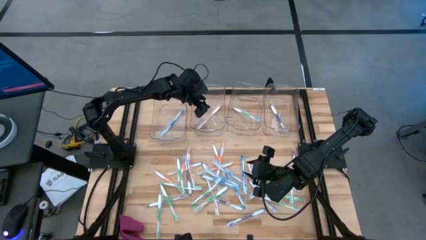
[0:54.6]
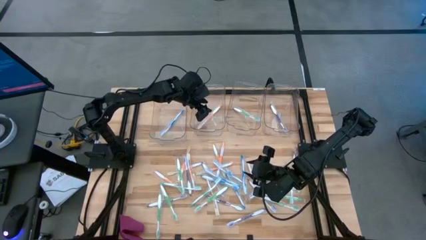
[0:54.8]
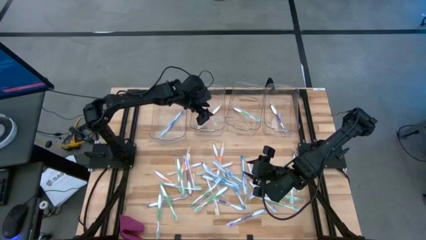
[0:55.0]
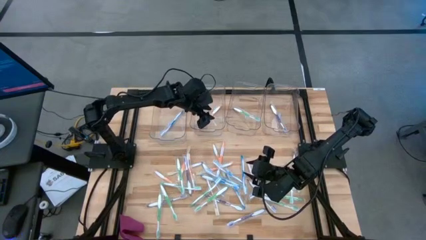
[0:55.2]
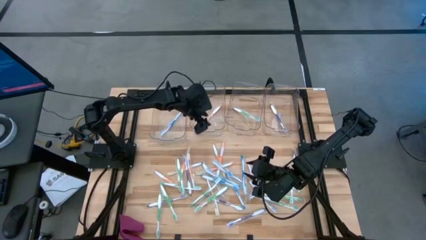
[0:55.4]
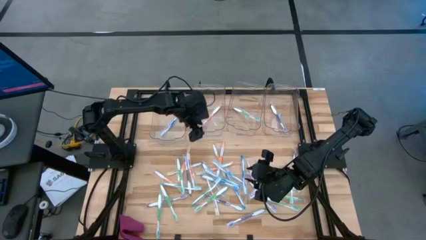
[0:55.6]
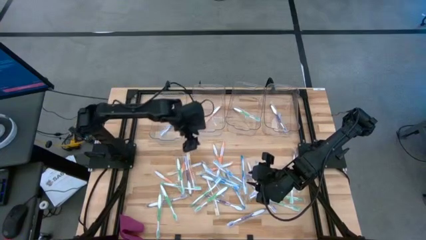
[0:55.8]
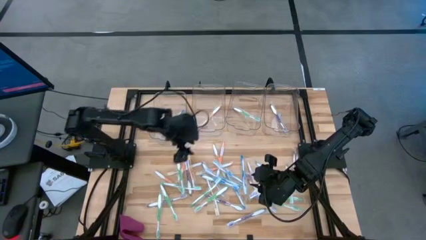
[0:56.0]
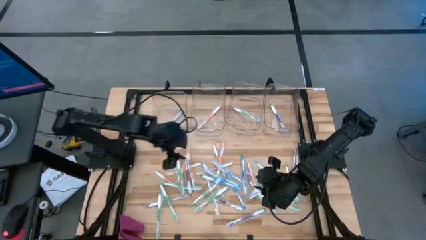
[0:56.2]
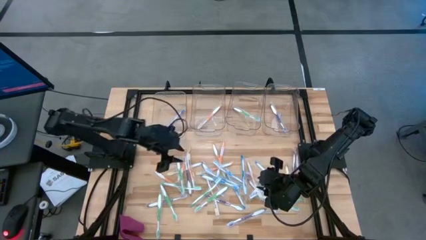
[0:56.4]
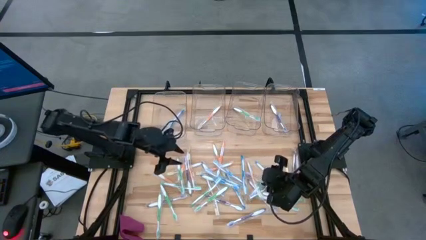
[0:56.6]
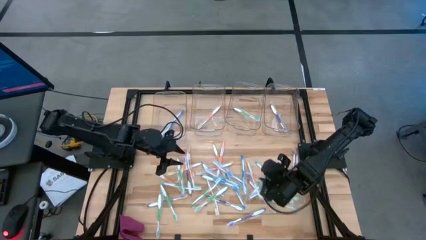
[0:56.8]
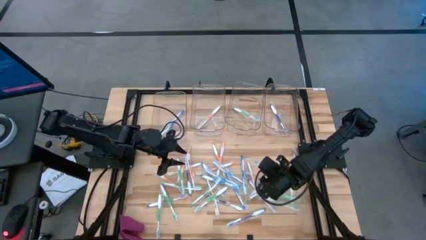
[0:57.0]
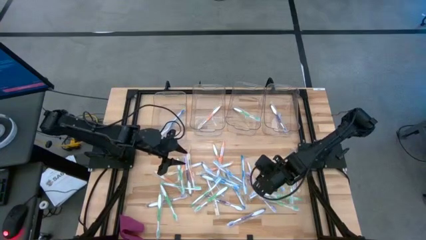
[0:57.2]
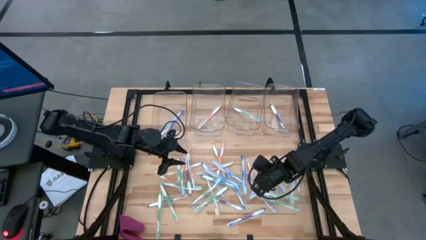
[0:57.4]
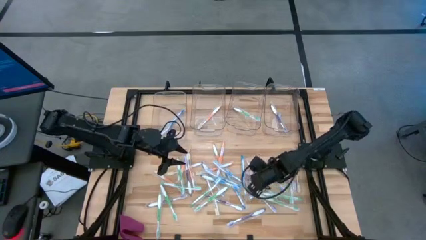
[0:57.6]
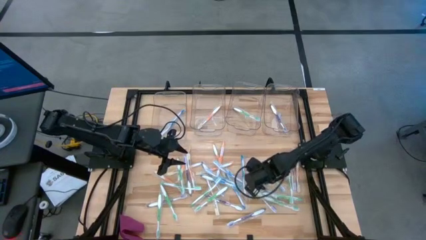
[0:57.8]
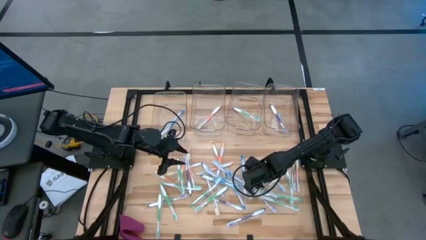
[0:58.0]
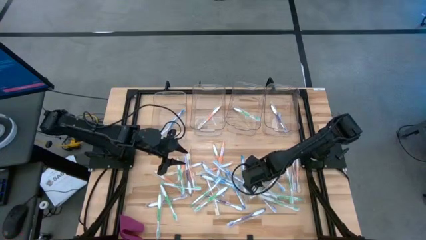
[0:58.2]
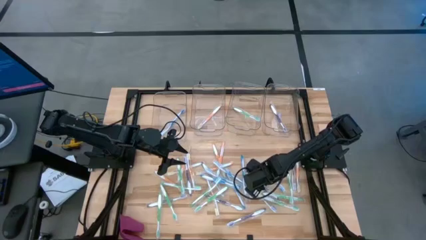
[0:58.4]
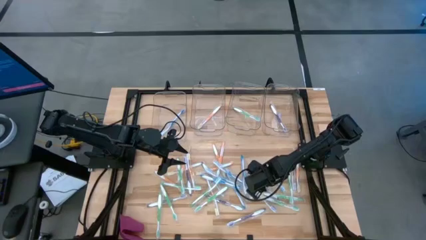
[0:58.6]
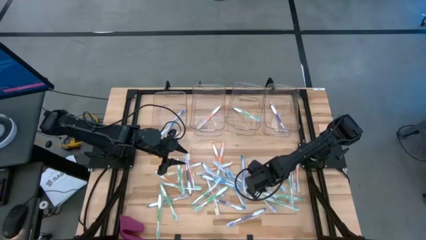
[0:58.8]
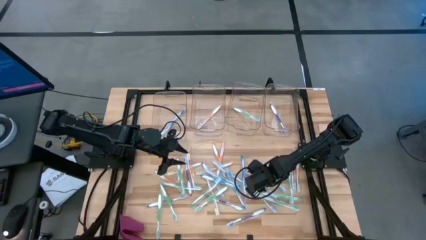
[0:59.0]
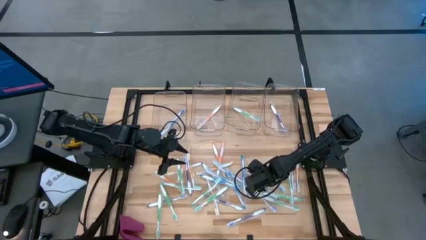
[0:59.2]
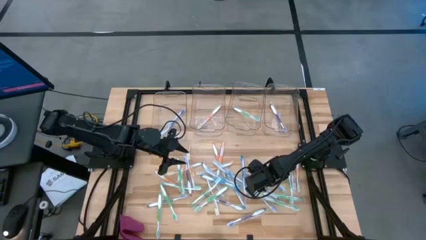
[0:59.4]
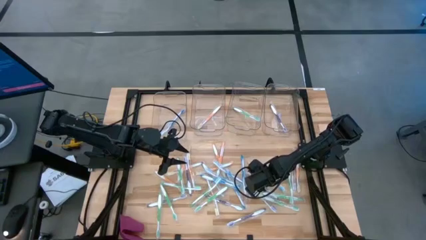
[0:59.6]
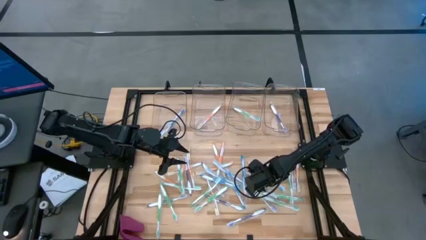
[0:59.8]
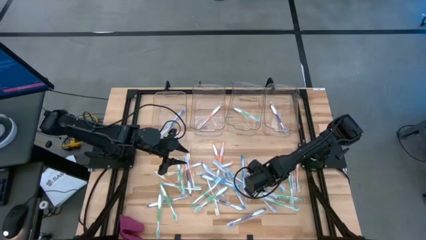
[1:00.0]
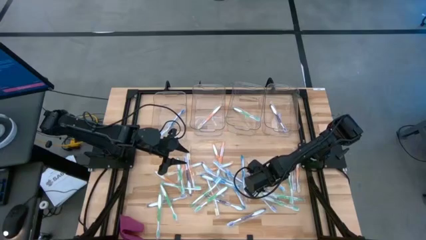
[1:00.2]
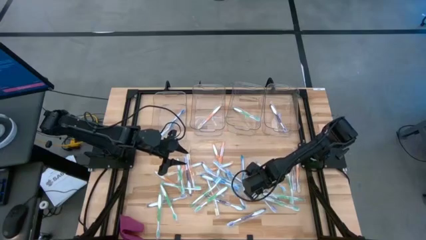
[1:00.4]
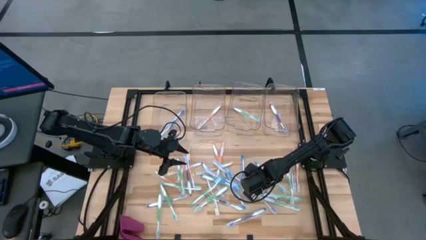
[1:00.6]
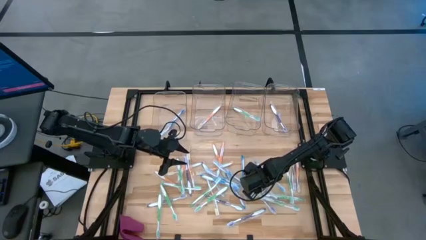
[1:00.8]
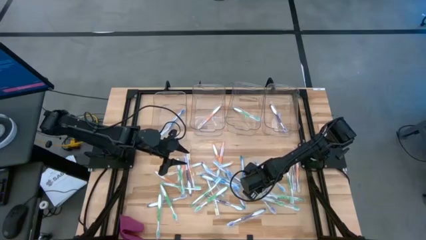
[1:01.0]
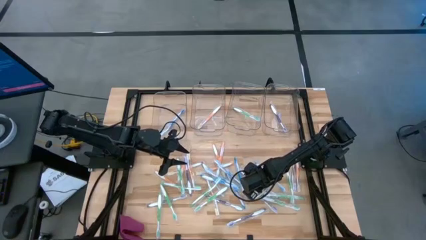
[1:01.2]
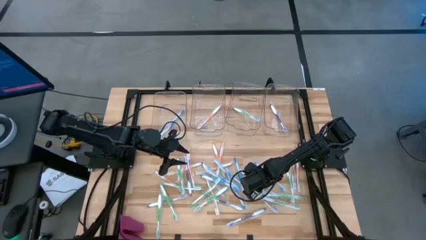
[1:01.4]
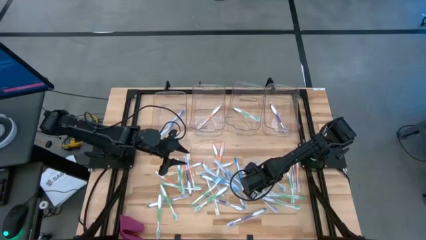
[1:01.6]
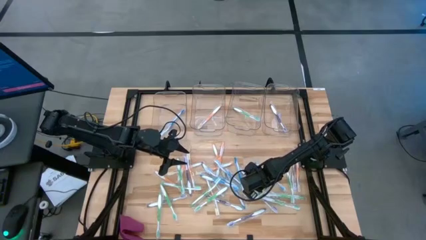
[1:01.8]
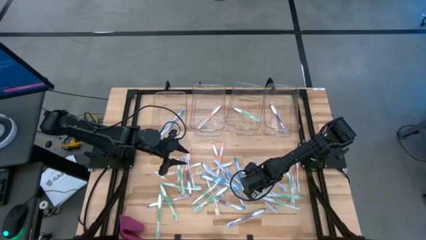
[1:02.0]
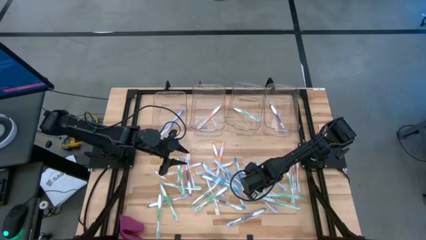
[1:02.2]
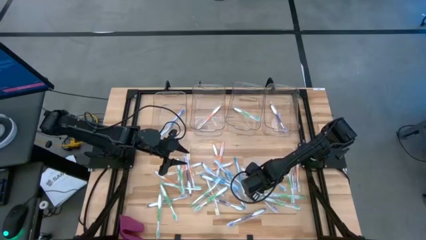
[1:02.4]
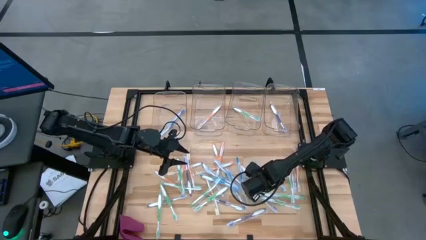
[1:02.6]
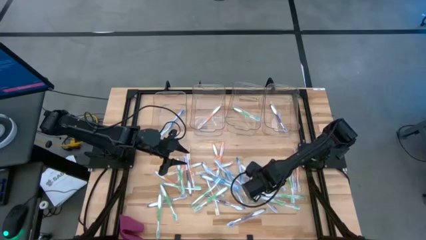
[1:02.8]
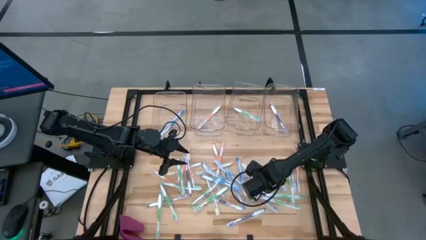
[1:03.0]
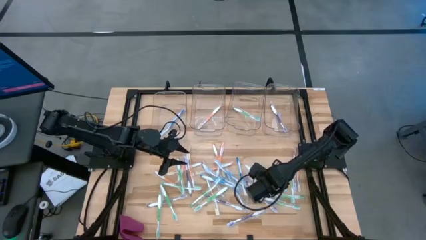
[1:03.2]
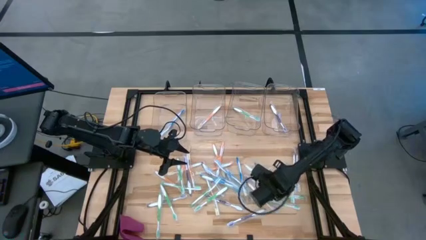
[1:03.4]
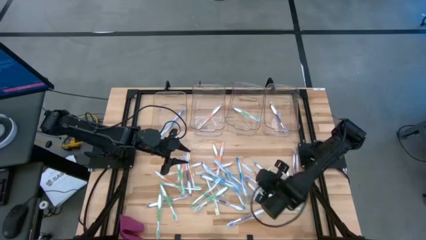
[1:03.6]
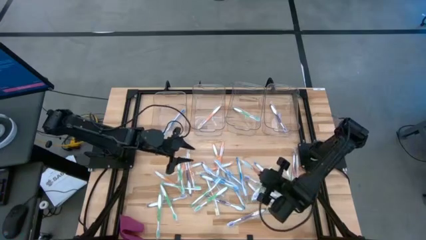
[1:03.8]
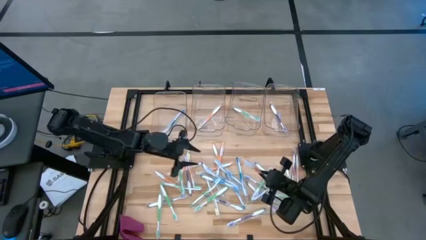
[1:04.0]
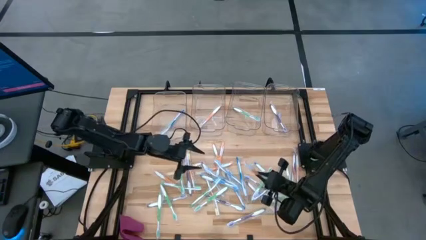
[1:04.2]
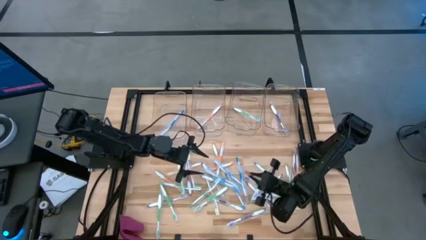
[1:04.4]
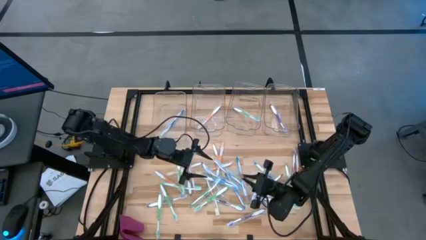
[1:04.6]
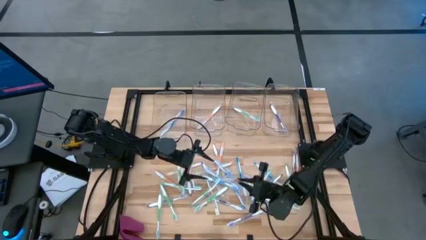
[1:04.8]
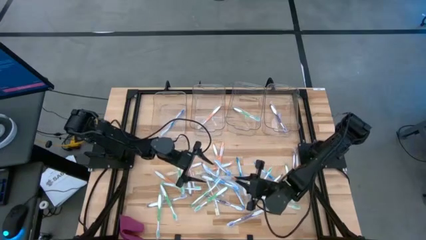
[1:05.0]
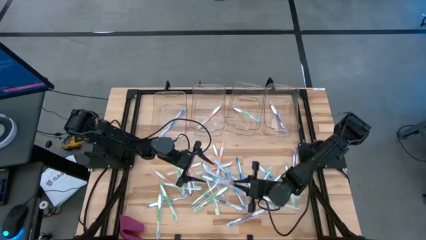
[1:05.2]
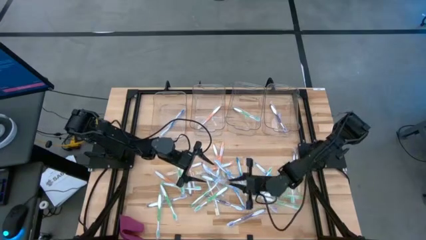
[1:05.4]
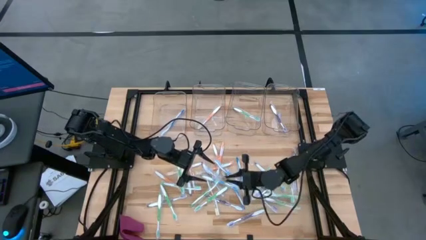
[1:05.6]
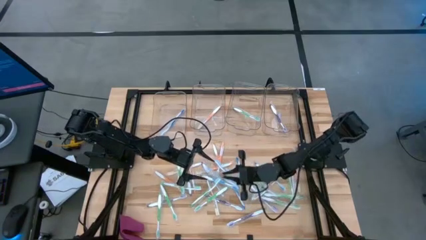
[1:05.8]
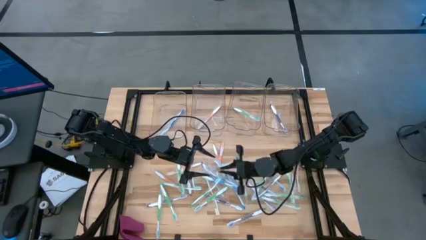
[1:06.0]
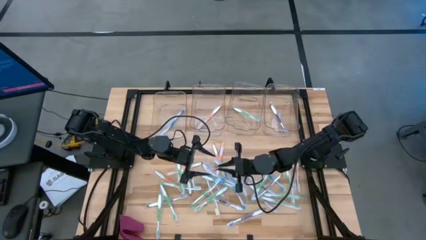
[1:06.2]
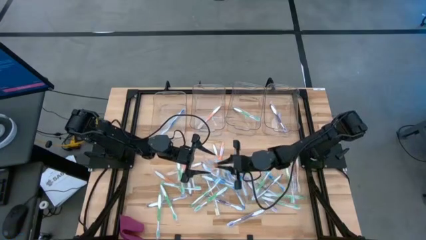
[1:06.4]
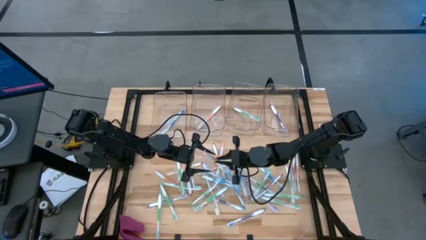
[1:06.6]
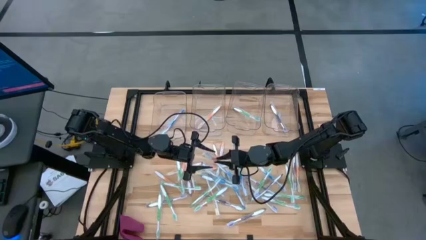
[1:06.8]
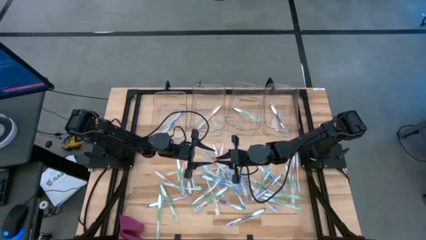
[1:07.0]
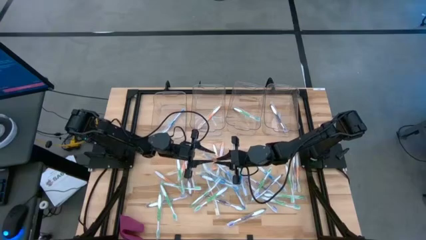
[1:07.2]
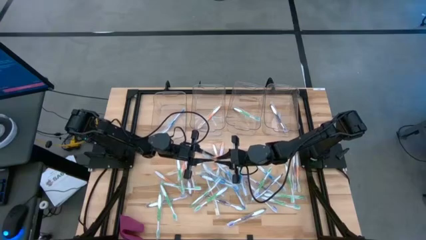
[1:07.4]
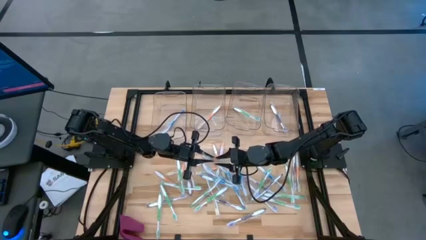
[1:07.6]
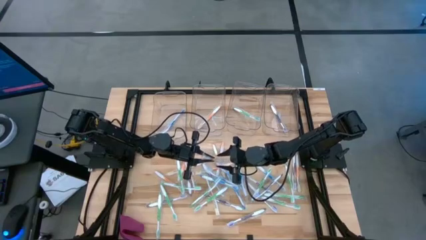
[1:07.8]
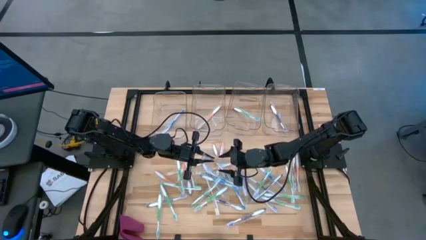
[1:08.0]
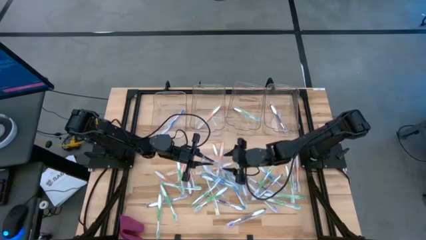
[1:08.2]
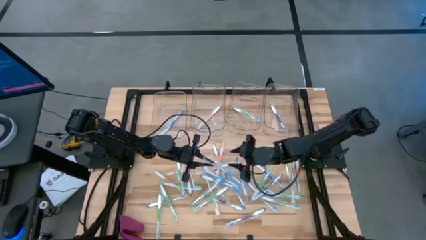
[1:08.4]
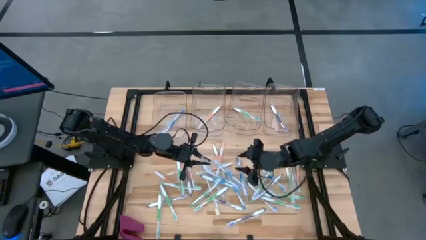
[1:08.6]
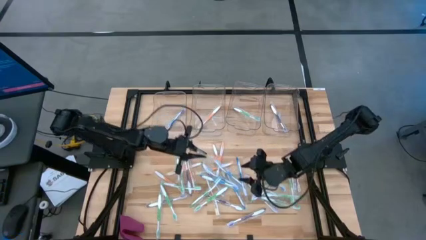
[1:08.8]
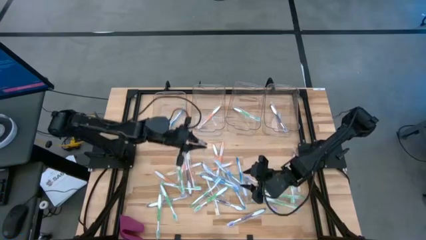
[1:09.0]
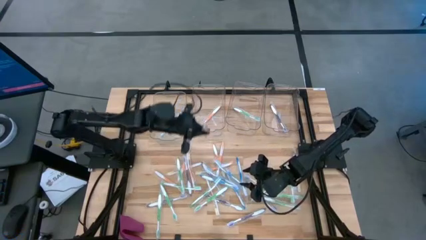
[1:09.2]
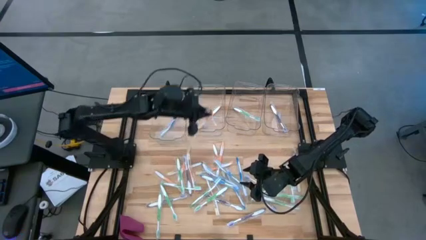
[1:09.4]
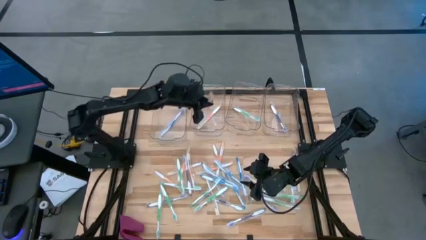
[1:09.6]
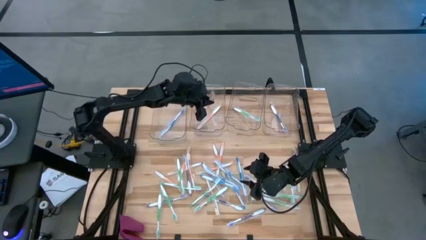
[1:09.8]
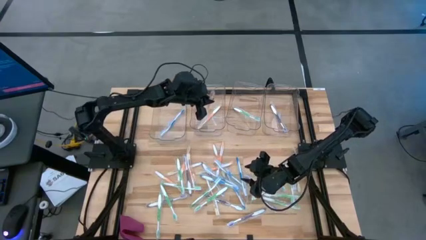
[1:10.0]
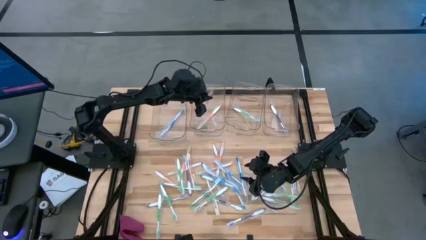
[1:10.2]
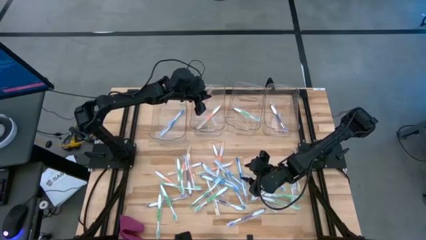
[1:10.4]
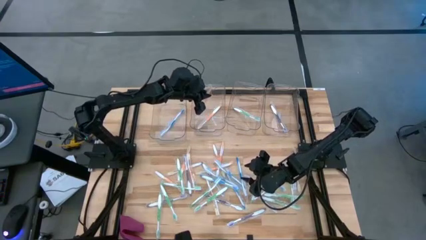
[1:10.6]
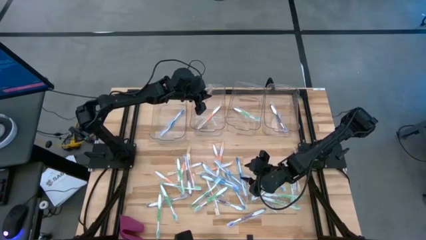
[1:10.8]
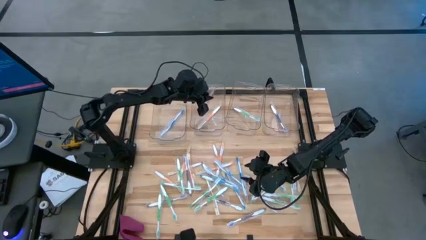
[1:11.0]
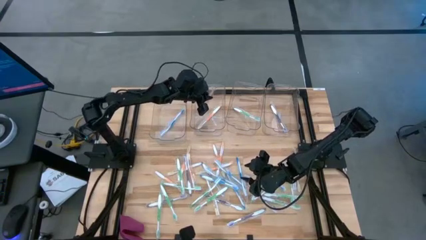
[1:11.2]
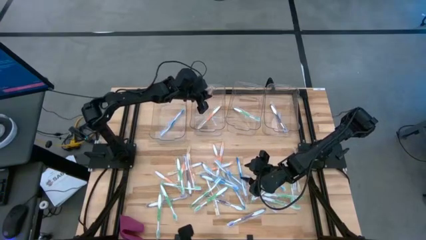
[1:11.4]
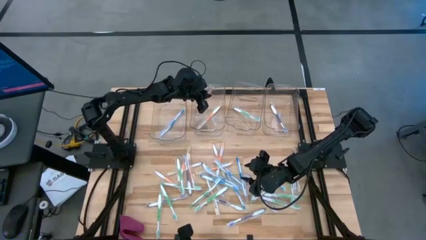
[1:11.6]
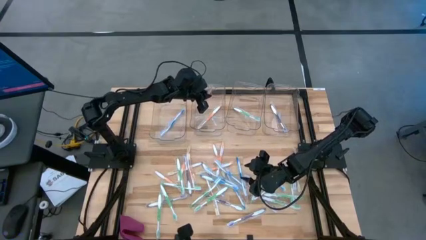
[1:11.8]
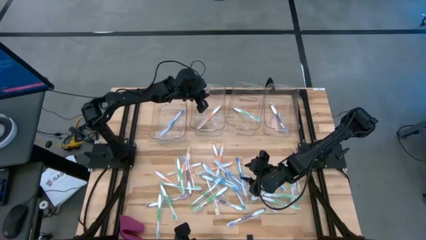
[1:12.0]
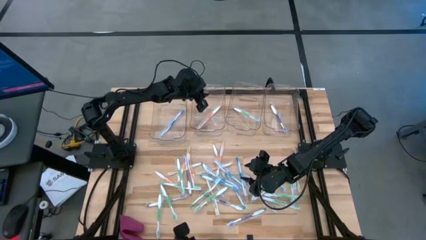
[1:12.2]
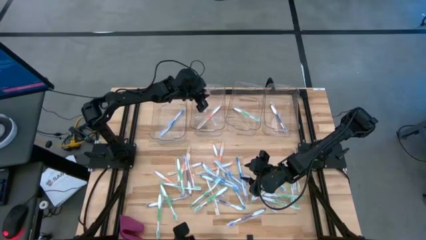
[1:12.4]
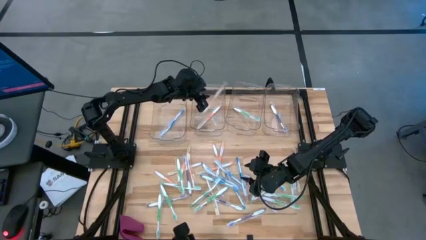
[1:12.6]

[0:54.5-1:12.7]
Task: Pick & Place Toothbrushes
Put the orange toothbrush into the middle left transparent bin
